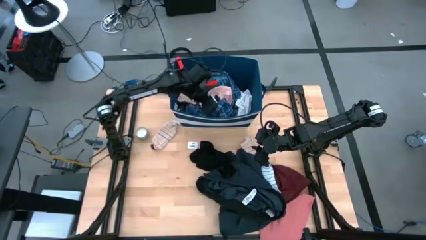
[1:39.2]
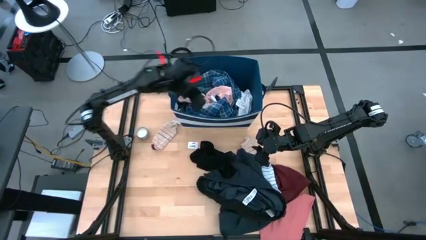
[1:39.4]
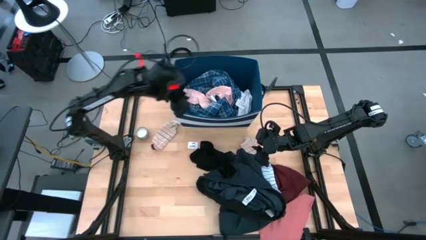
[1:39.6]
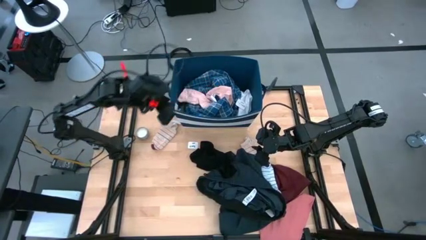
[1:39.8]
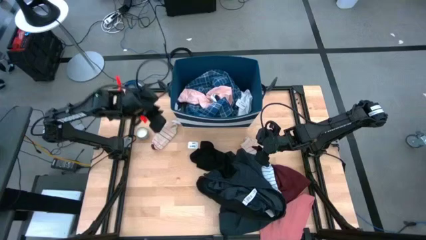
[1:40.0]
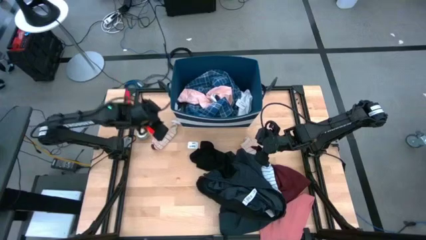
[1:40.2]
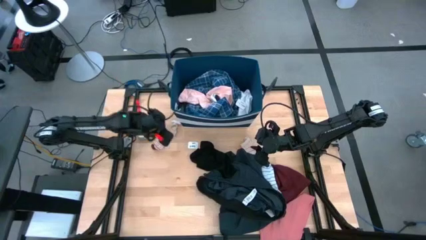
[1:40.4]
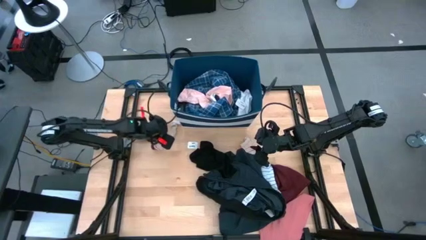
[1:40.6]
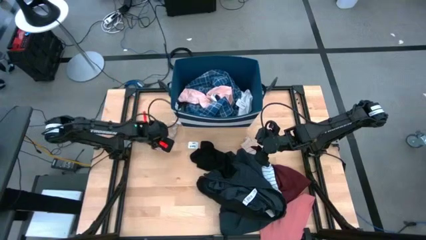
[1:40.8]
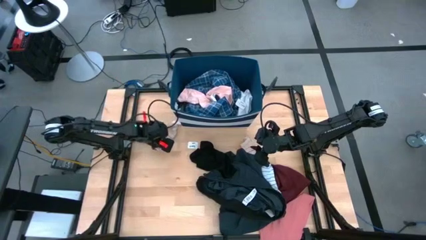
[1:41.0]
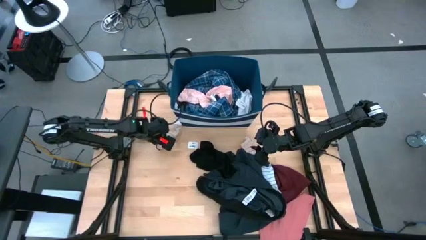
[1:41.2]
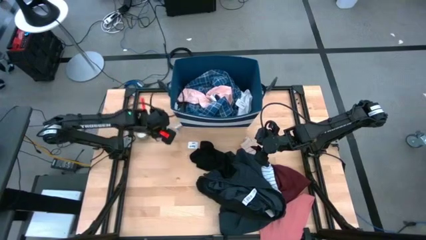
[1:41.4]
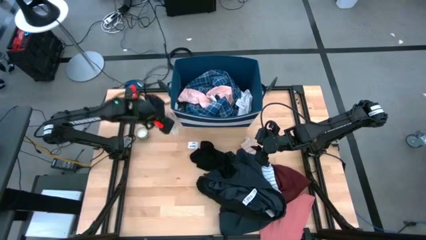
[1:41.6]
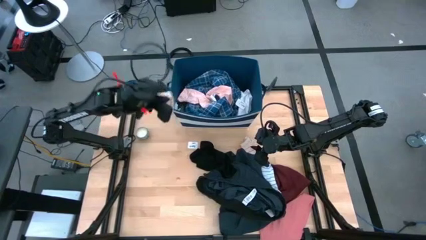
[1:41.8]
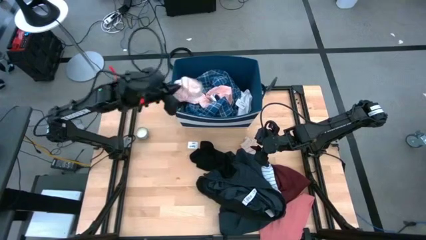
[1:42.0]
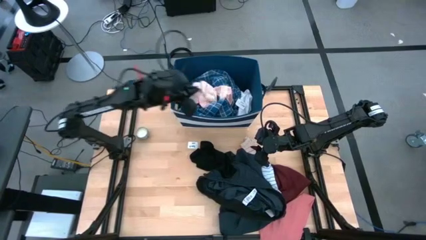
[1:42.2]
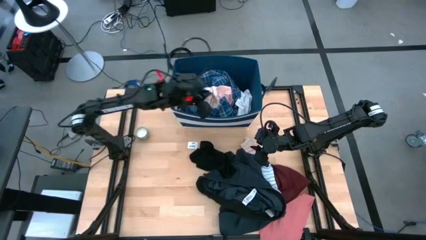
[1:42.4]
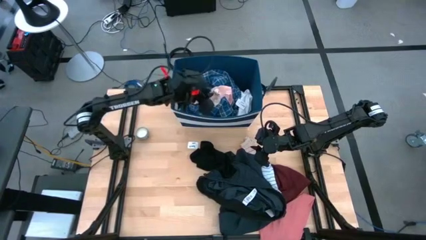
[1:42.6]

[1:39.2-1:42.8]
Task: Sort clothes
Put the red sock into the laundry organizer

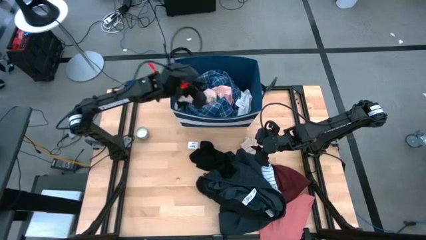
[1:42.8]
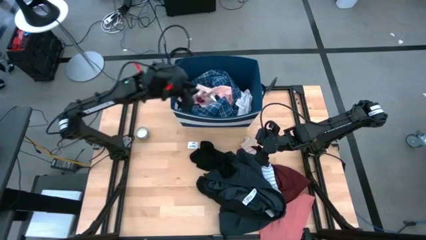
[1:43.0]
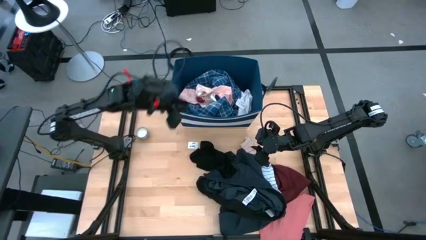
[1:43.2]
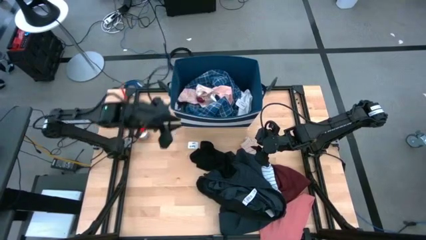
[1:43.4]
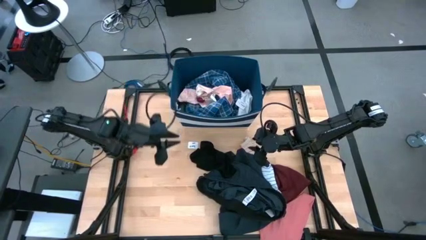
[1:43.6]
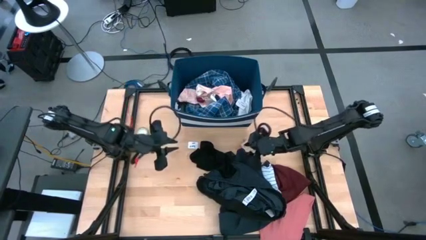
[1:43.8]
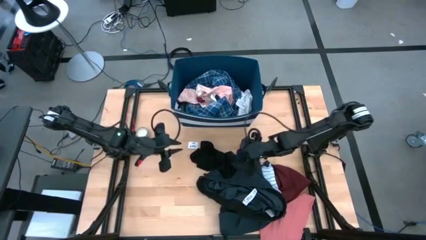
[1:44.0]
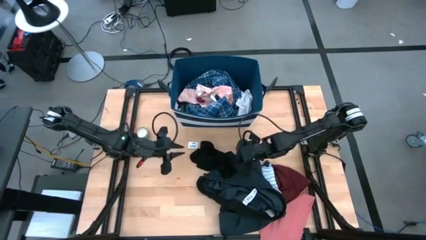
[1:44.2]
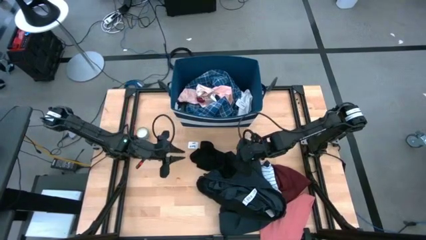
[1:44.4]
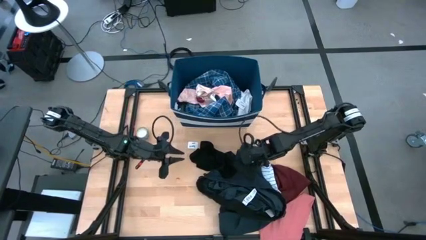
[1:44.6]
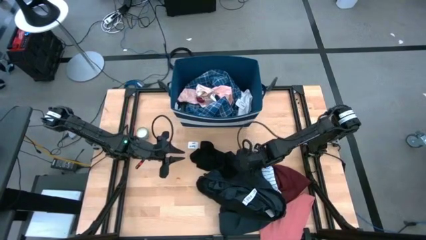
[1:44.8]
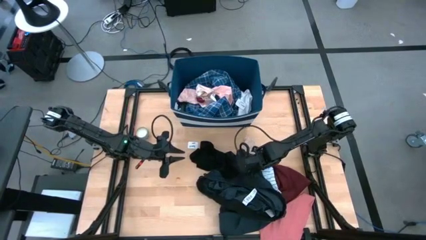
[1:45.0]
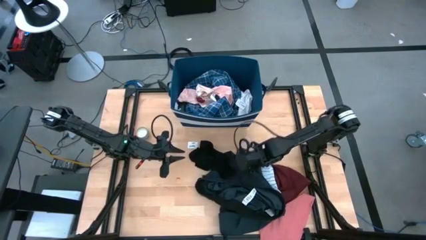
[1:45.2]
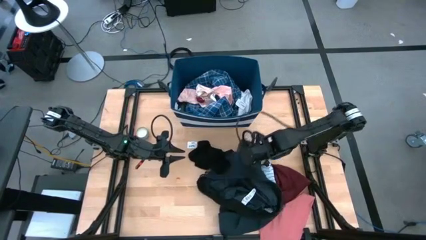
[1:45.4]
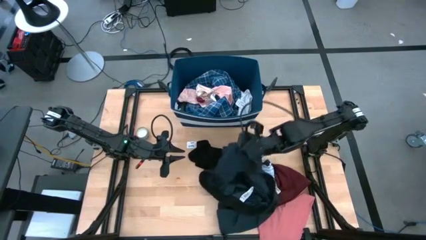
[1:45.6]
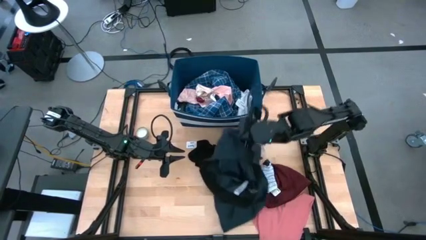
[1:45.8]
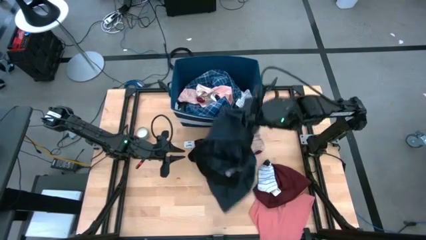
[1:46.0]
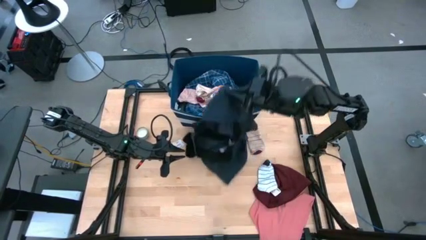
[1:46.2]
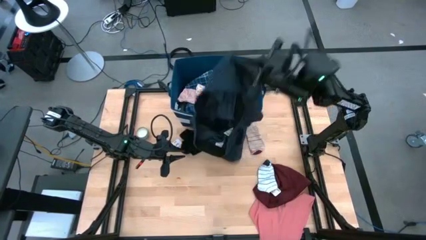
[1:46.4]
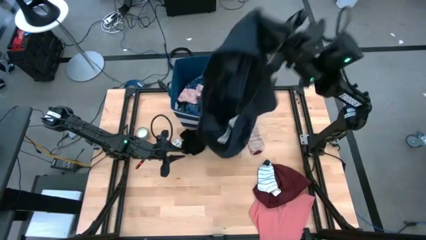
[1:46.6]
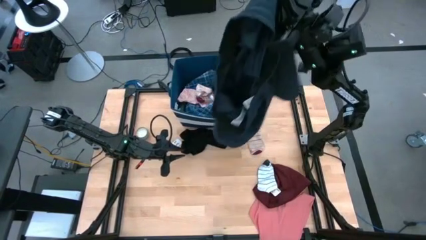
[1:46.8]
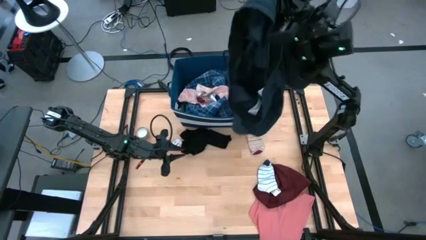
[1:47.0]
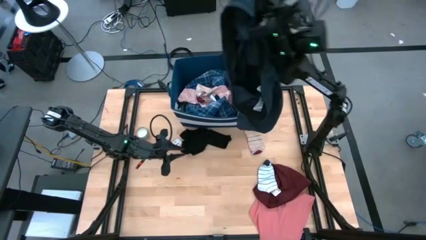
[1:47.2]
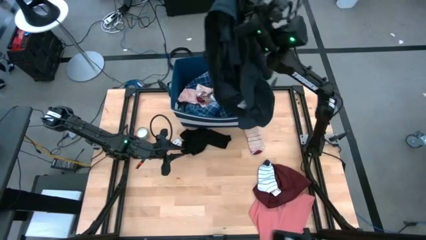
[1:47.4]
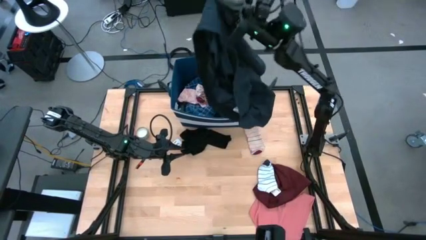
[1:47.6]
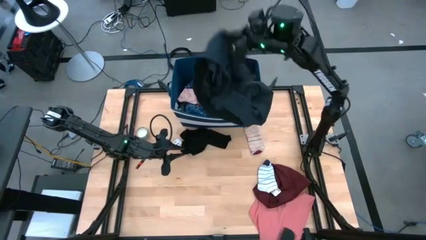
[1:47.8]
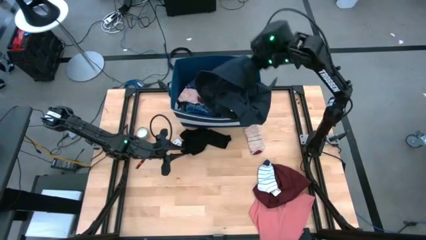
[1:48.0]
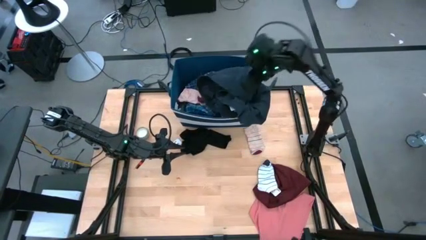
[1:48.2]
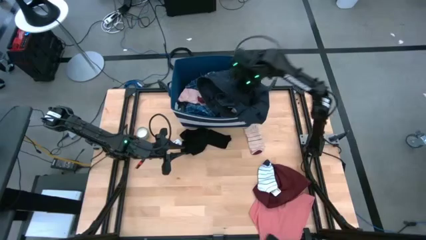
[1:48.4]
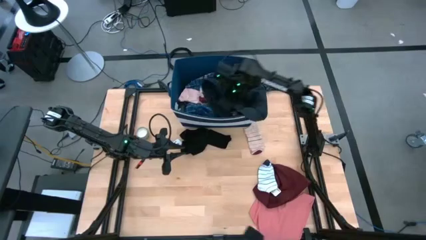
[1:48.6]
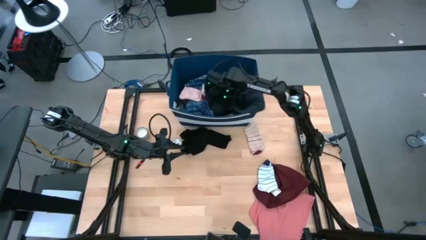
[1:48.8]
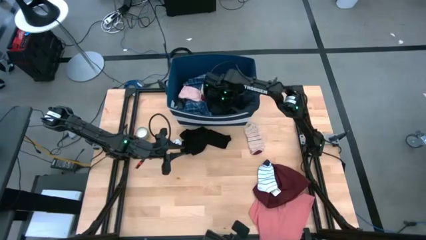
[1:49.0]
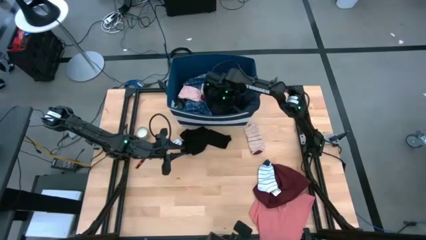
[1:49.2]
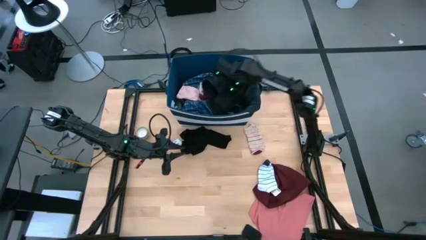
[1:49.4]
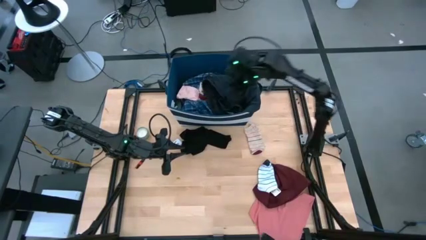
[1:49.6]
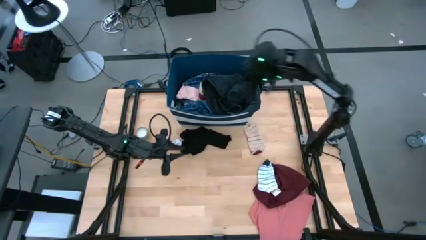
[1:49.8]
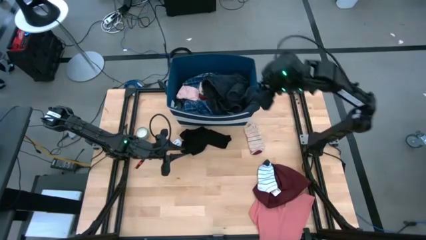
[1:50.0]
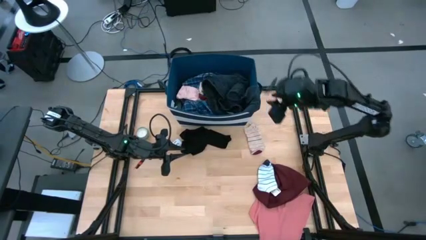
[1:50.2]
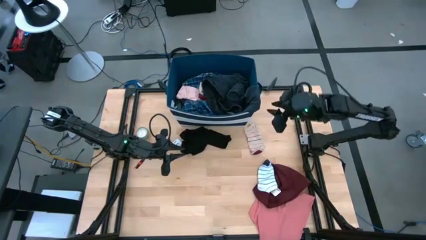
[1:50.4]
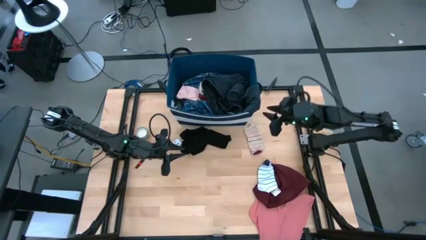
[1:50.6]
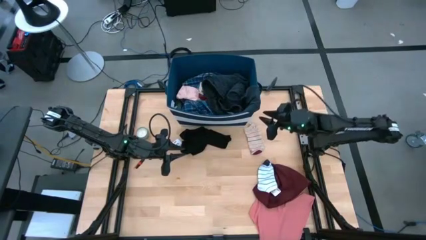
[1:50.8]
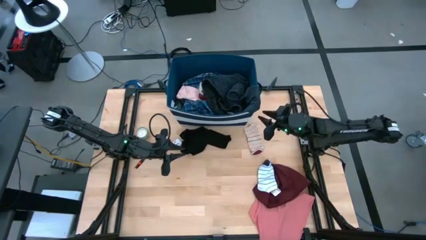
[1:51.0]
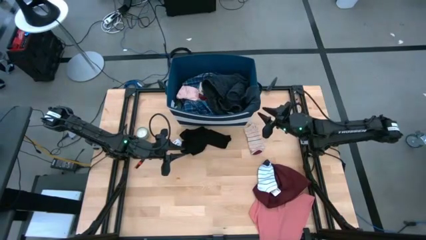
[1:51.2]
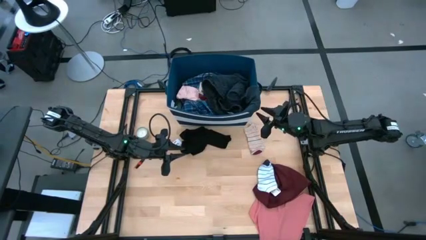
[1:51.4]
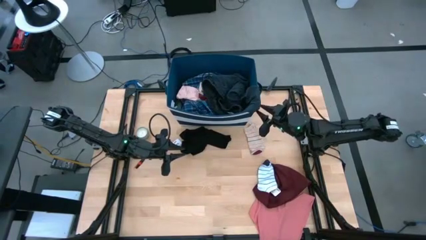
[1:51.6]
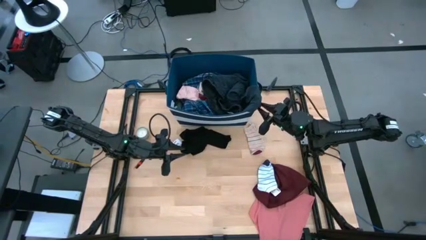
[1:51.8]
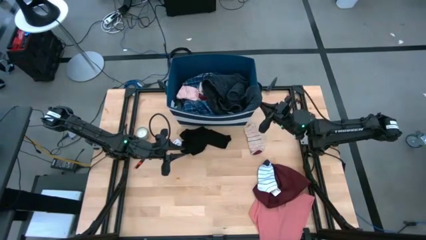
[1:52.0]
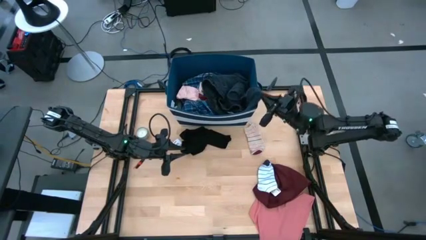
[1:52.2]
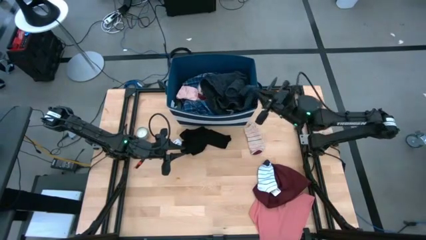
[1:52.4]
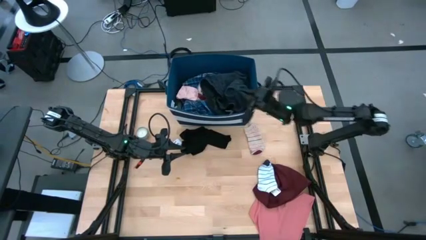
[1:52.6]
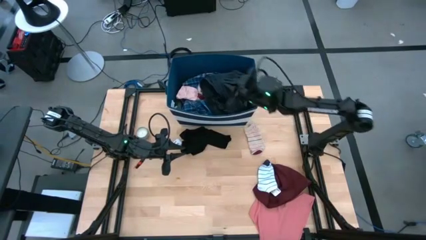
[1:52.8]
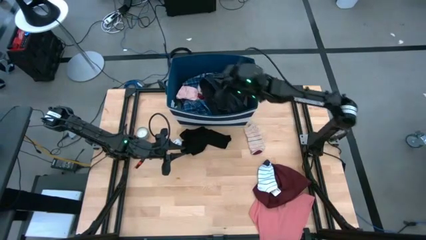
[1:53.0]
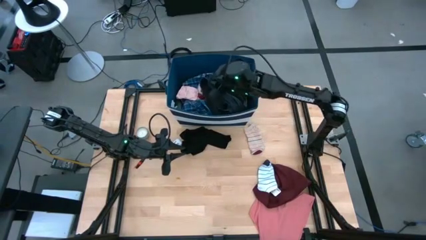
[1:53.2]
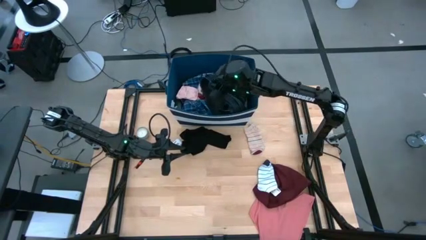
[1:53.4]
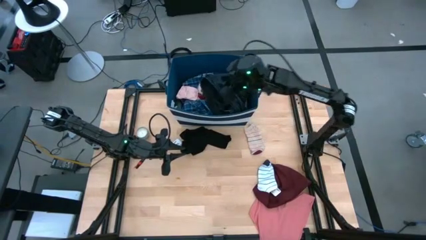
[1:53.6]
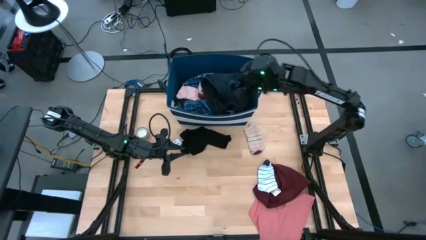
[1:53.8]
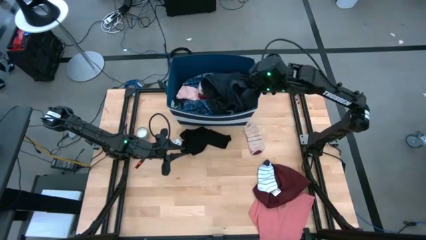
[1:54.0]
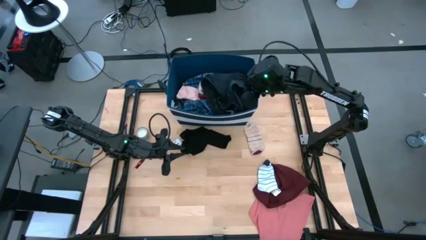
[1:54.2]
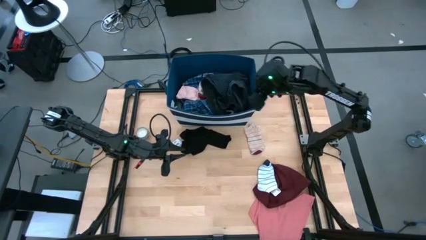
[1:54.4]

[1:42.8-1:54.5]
Put the black short into the laundry organizer

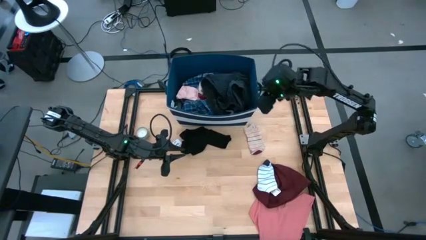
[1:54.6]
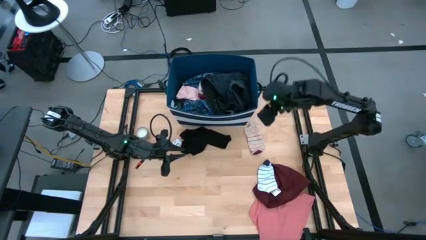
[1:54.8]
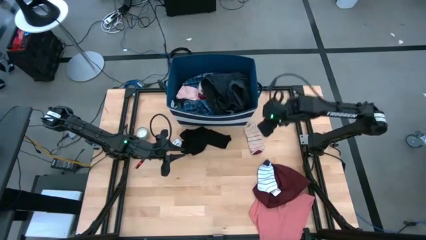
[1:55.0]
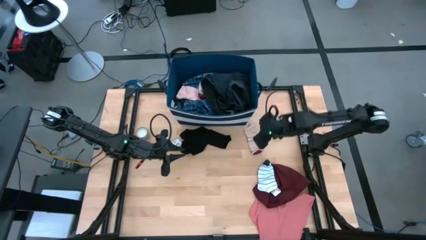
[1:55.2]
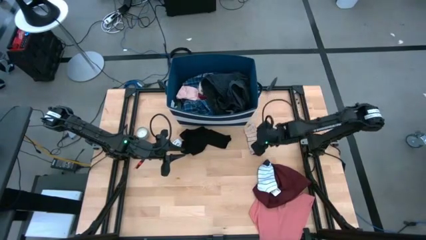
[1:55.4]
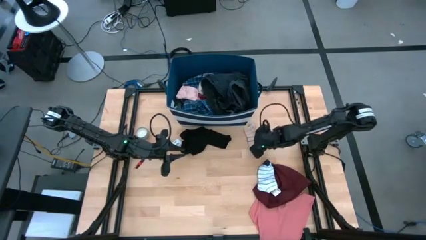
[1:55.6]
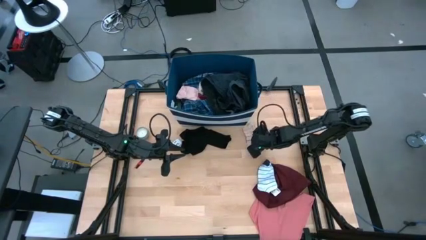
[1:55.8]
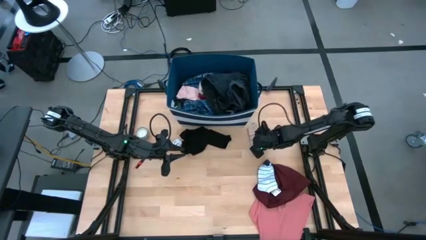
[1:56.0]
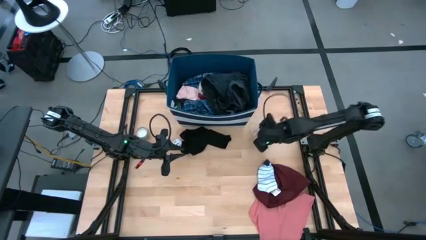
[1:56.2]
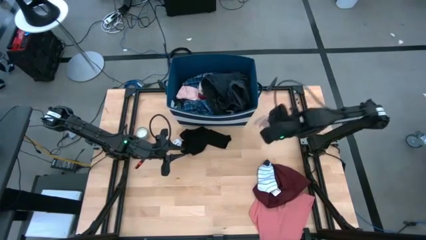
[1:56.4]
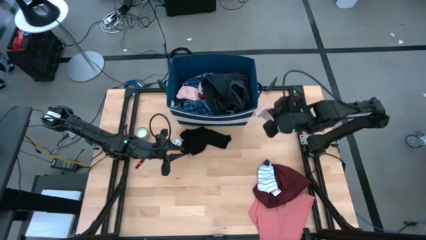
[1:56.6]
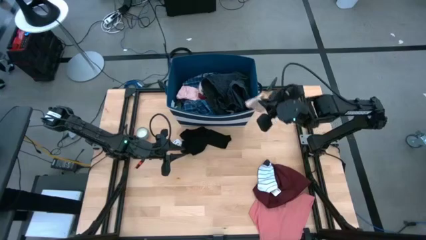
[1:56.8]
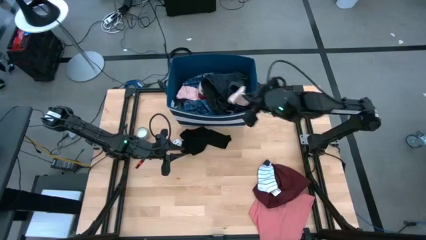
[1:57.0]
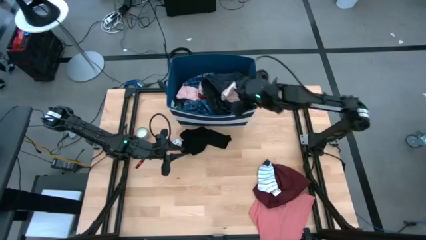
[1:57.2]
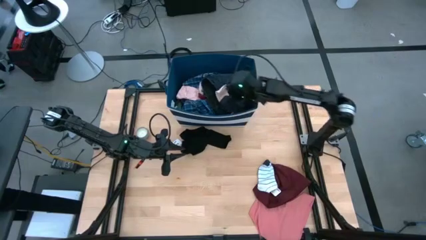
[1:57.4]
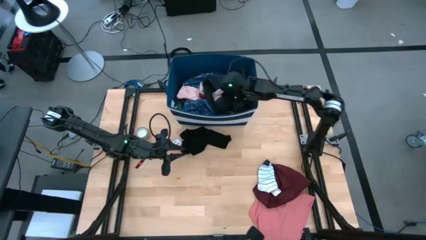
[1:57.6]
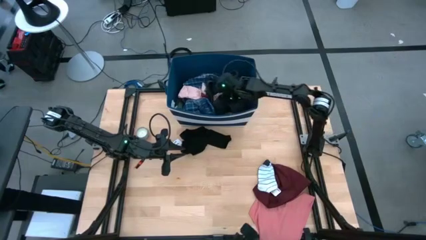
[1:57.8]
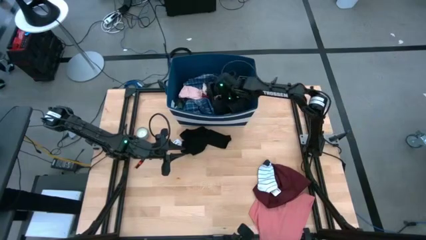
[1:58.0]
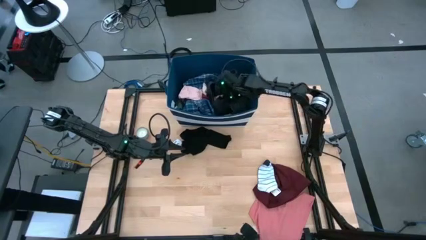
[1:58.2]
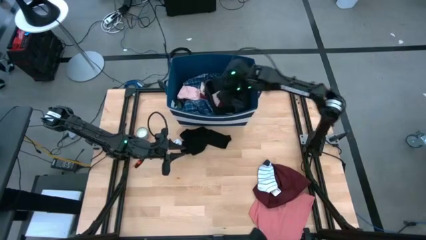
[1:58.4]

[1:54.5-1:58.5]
Put the red sock into the laundry organizer
